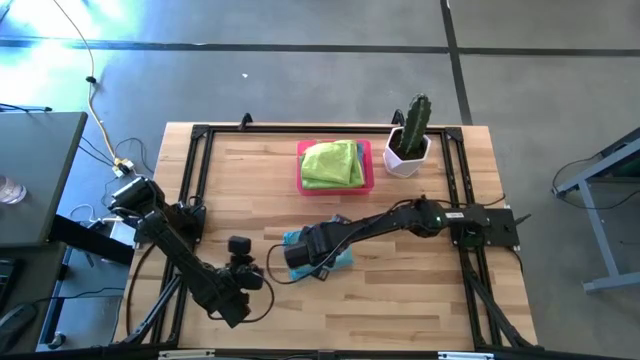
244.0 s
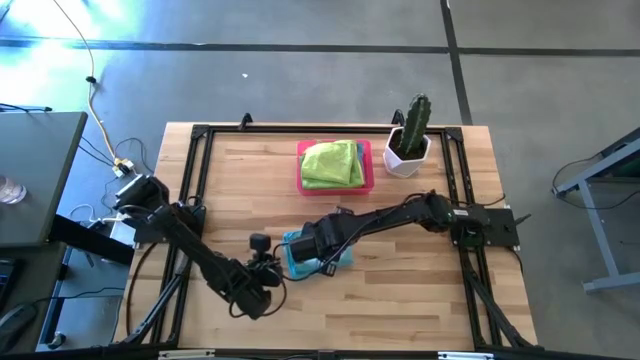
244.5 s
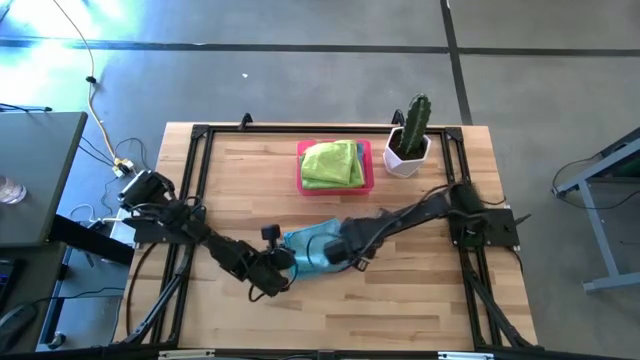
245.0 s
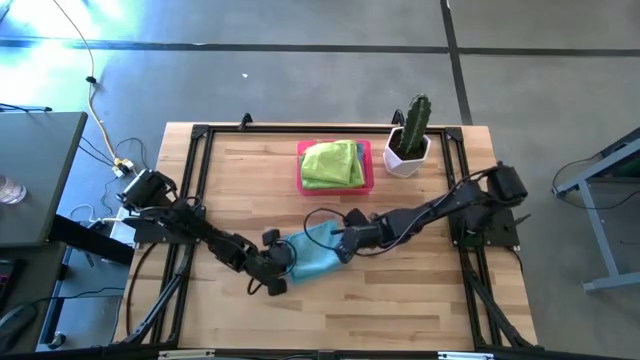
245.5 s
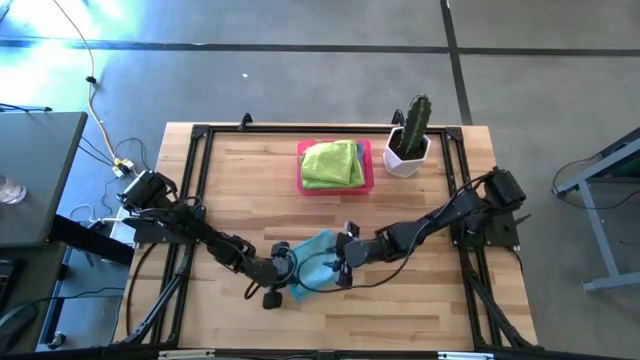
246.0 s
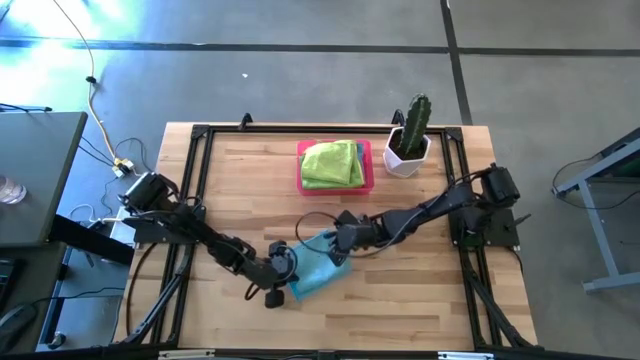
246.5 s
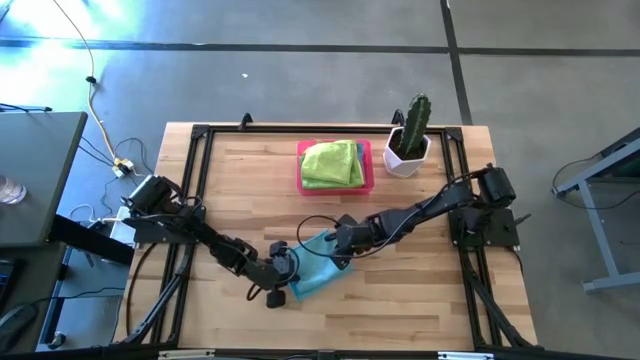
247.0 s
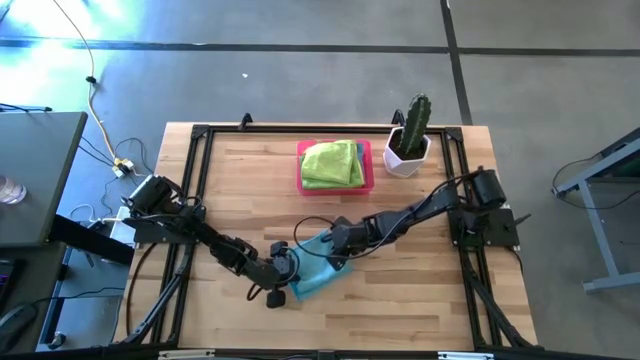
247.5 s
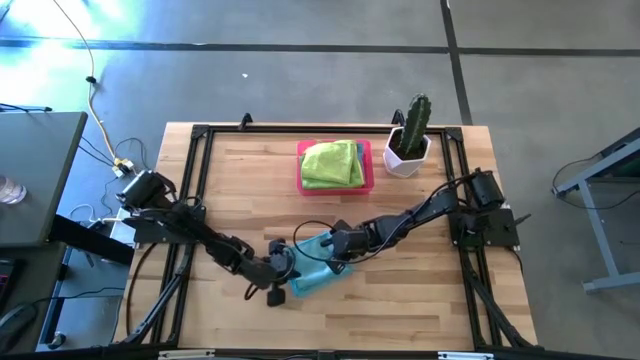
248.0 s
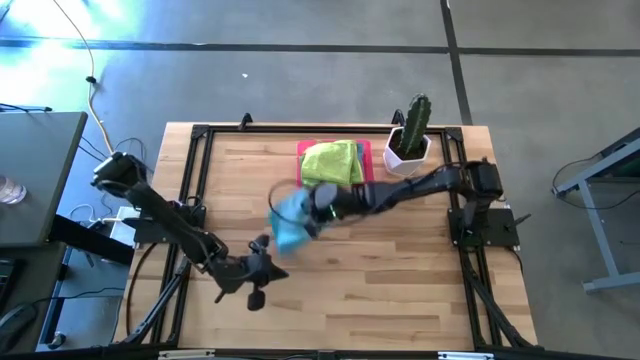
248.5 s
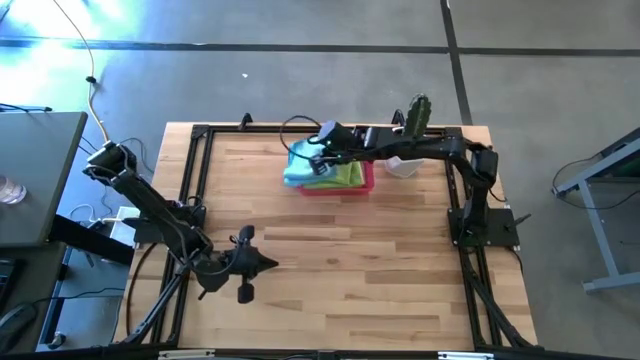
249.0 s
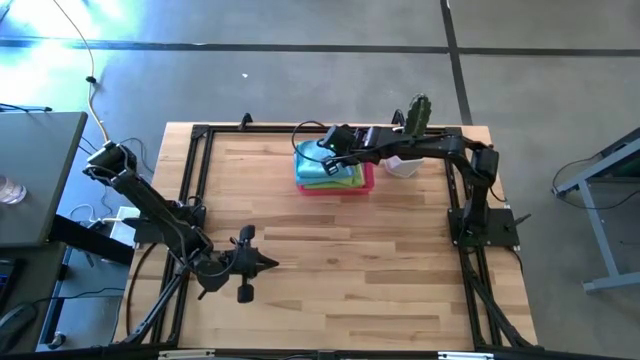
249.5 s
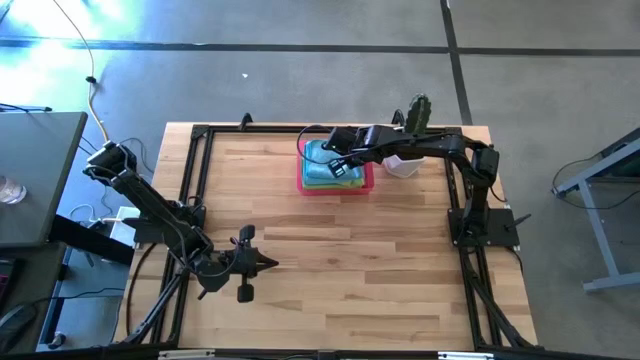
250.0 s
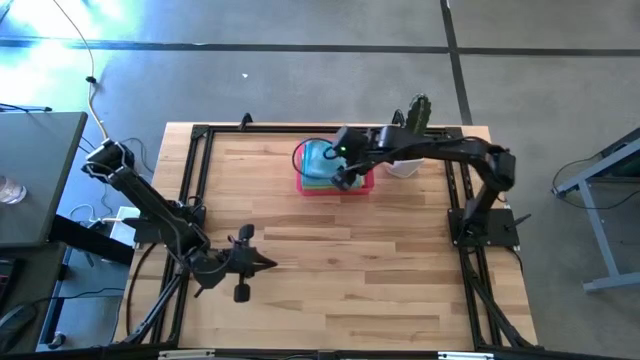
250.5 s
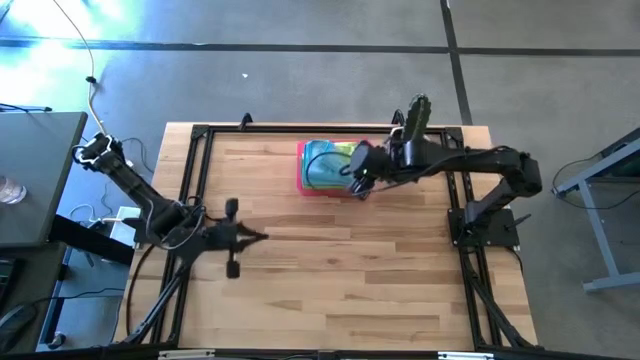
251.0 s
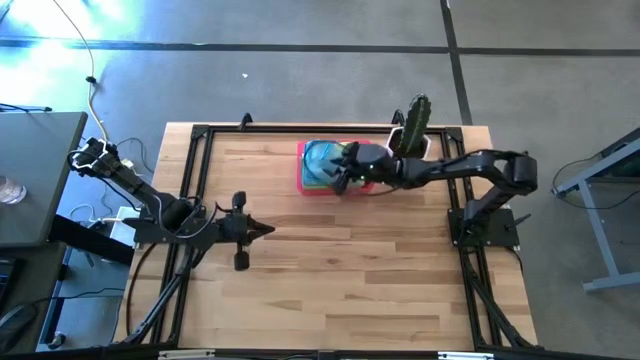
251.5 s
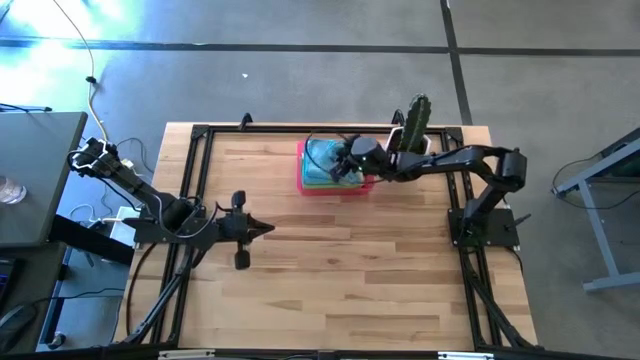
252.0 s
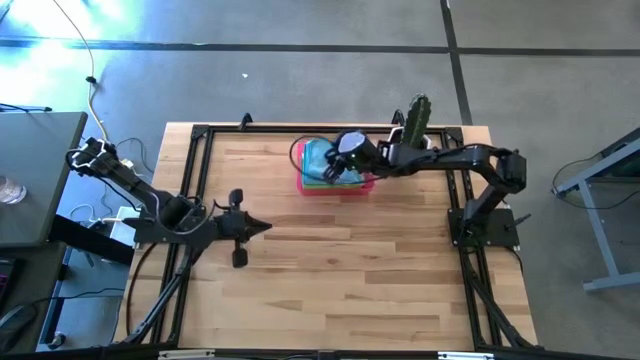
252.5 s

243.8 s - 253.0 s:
Task: Fold microfiber towels
Stack the folded blue microfiber cloth on top of the light green microfiber cloth in the pink bin

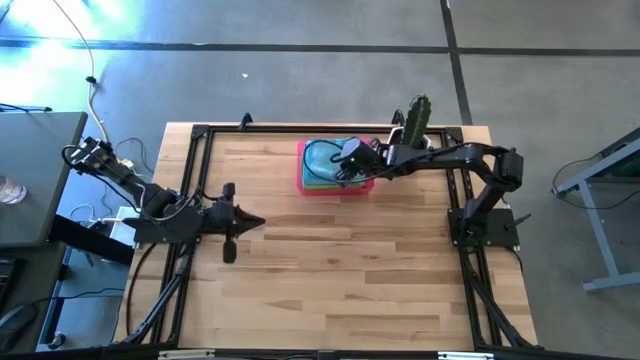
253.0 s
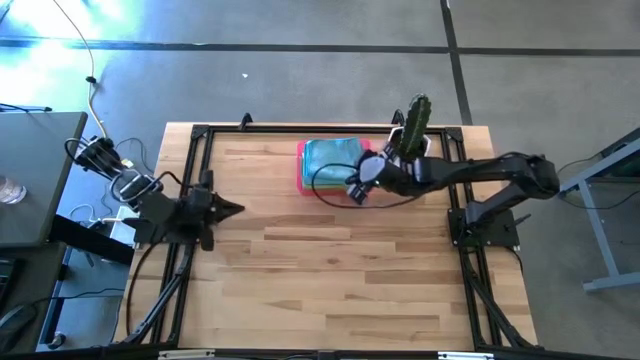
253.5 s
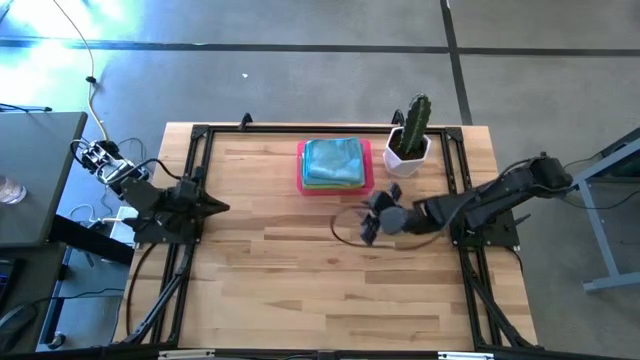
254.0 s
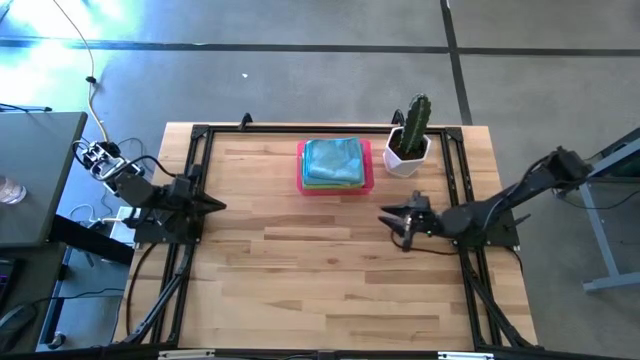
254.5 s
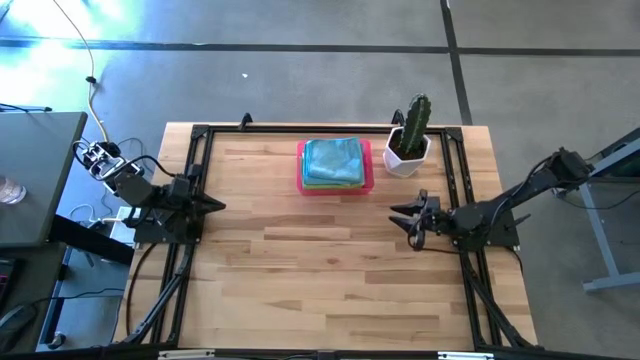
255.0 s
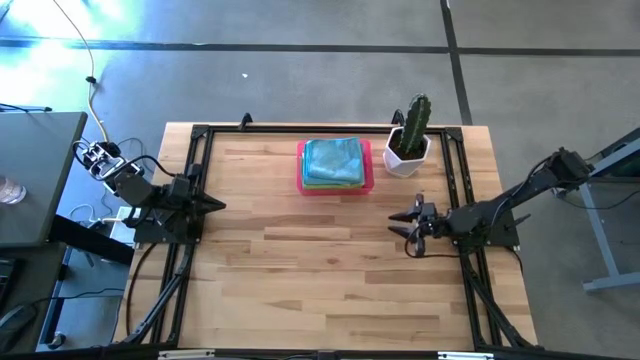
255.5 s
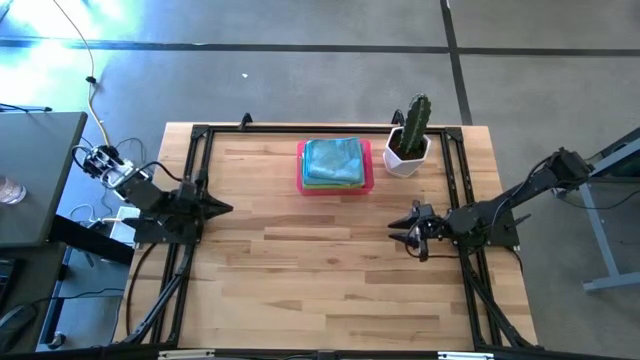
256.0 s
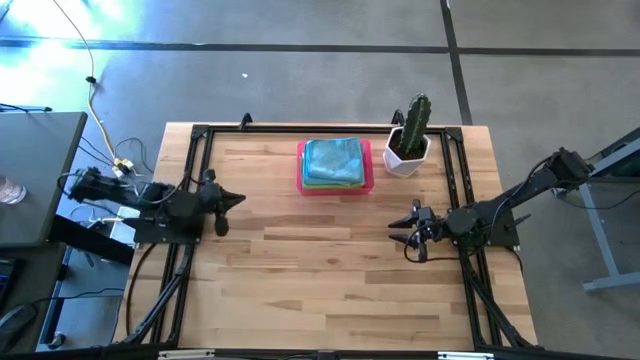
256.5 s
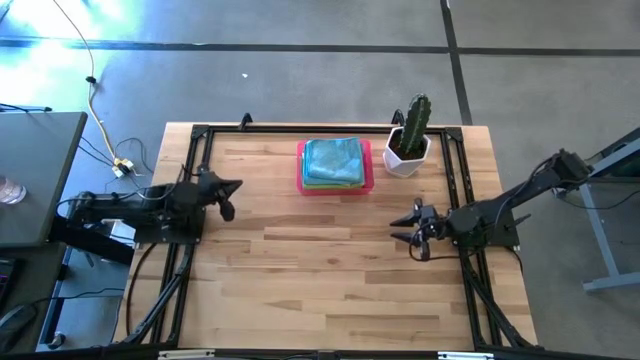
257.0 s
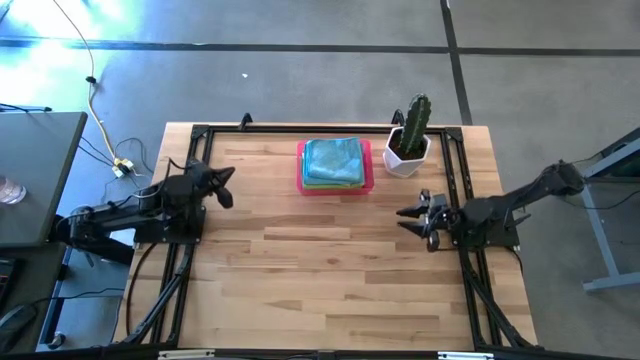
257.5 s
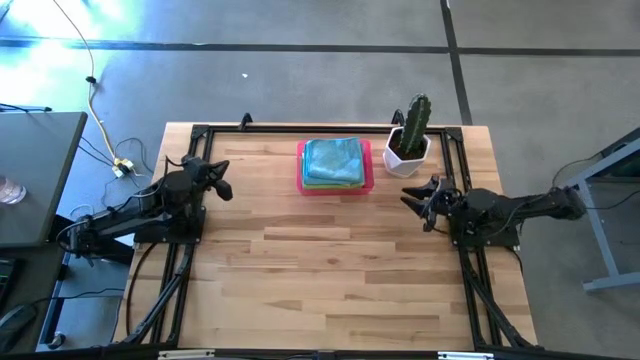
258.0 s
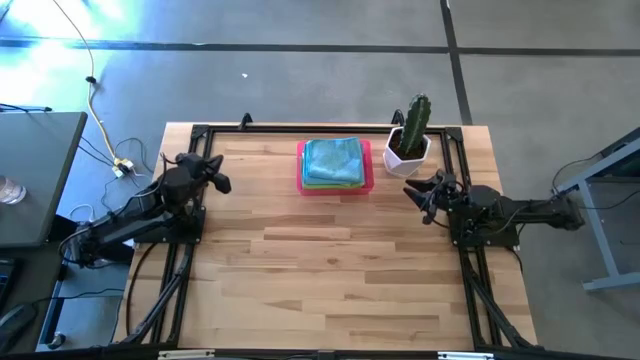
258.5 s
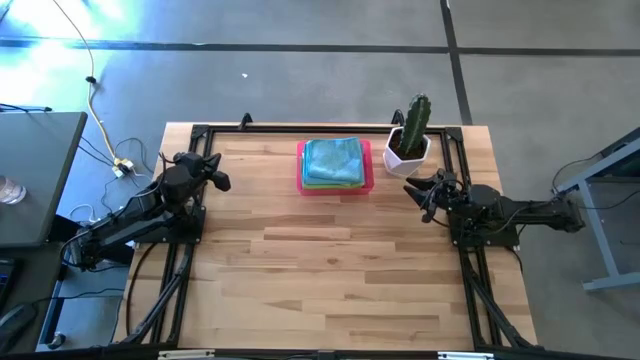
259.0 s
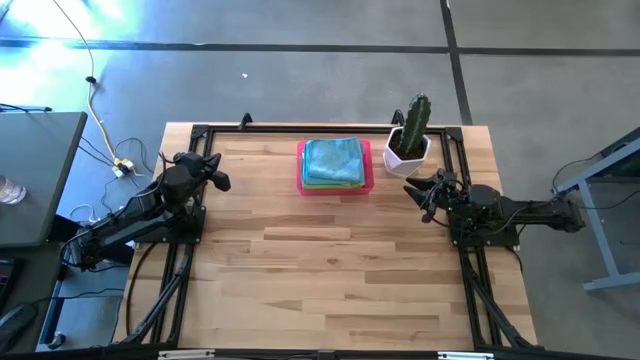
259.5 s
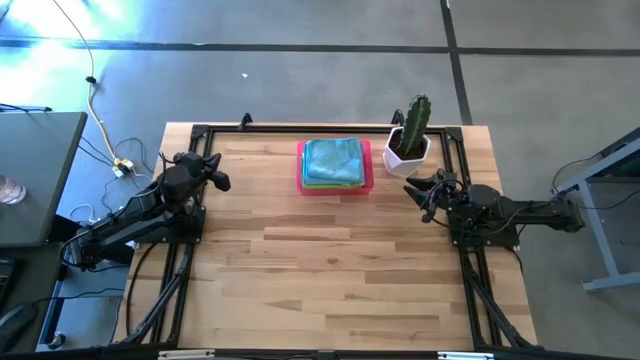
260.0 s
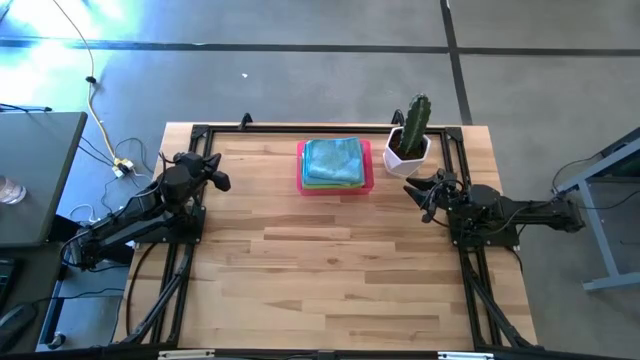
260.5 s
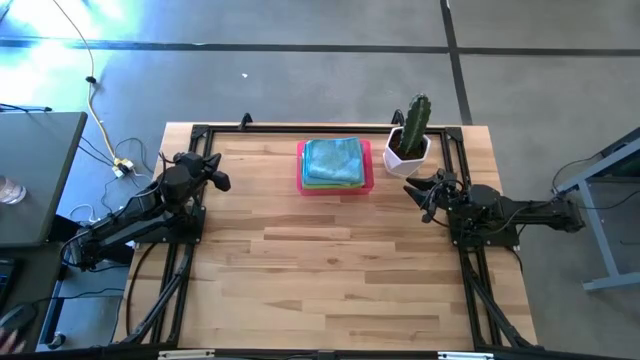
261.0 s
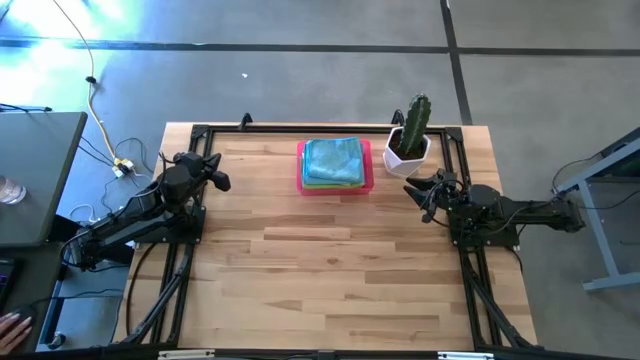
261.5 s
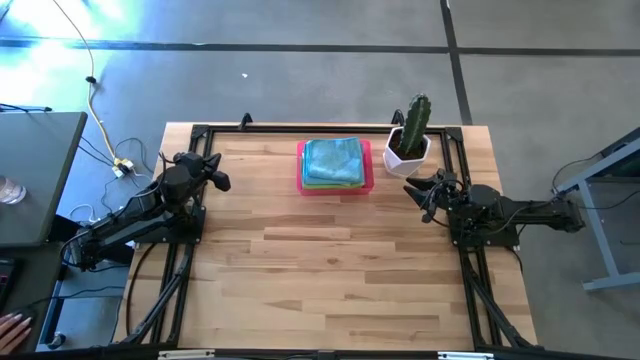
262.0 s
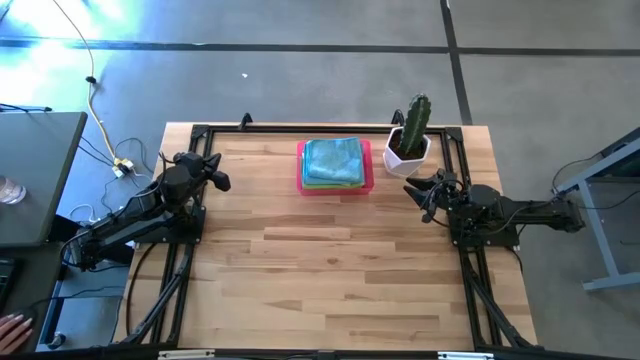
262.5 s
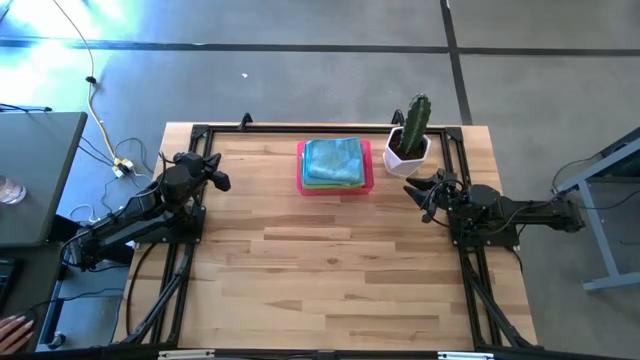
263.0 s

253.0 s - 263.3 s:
Return to Home Position
